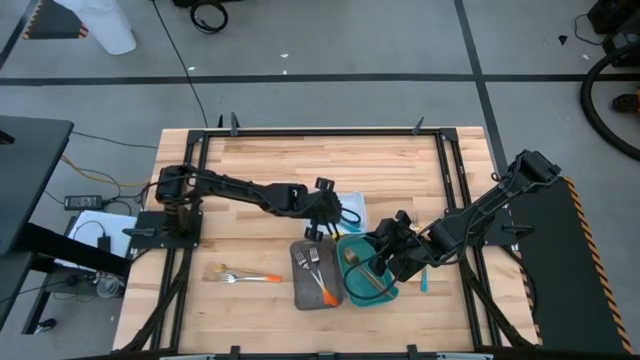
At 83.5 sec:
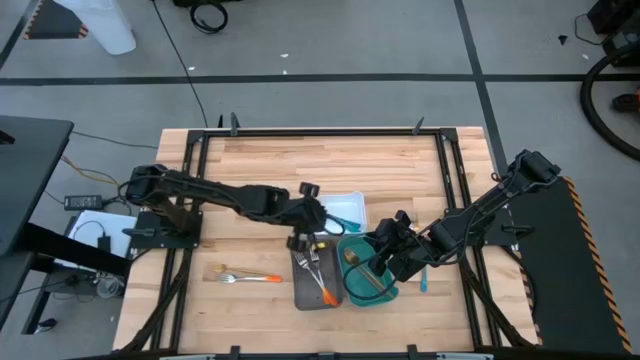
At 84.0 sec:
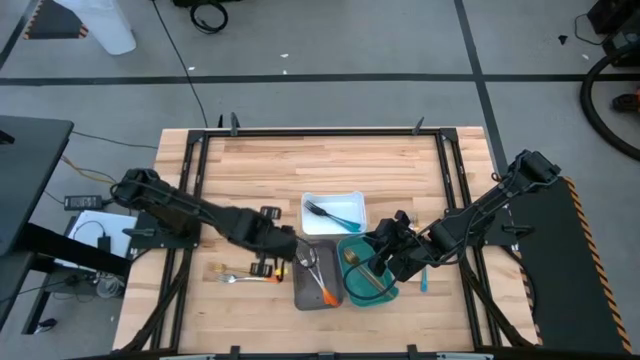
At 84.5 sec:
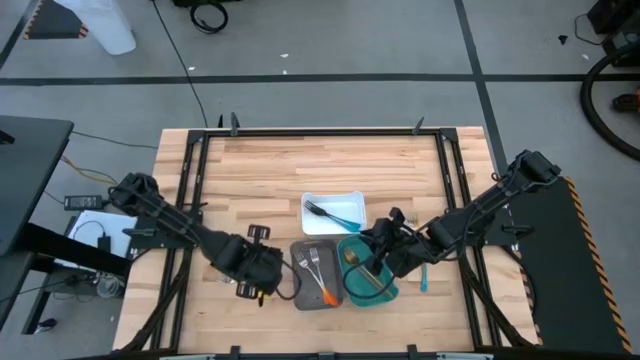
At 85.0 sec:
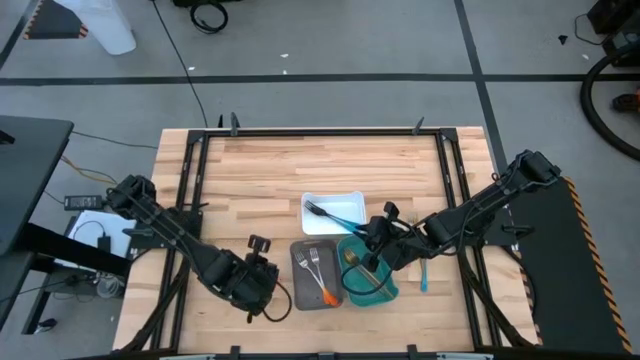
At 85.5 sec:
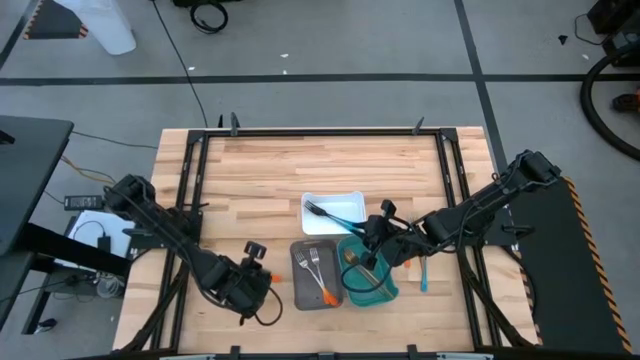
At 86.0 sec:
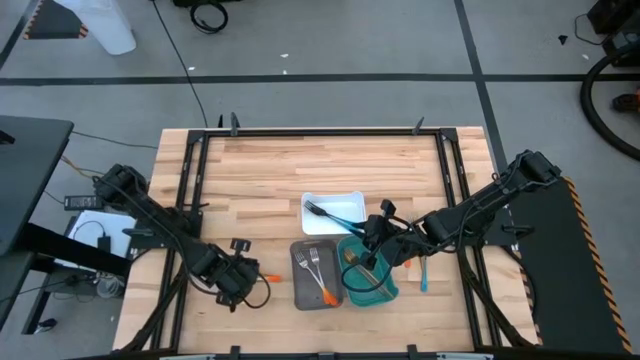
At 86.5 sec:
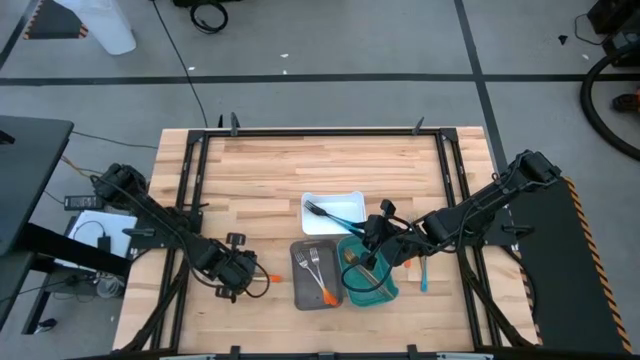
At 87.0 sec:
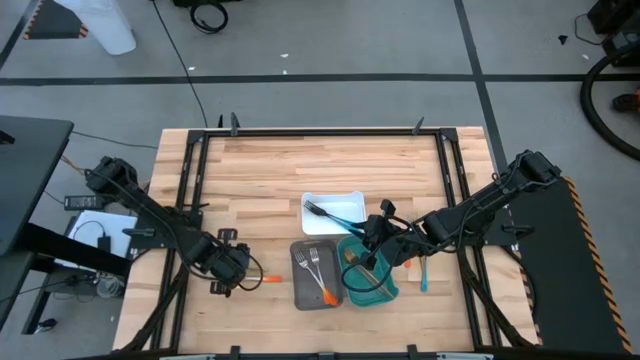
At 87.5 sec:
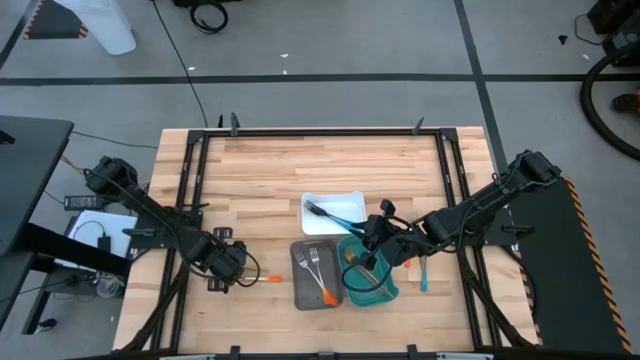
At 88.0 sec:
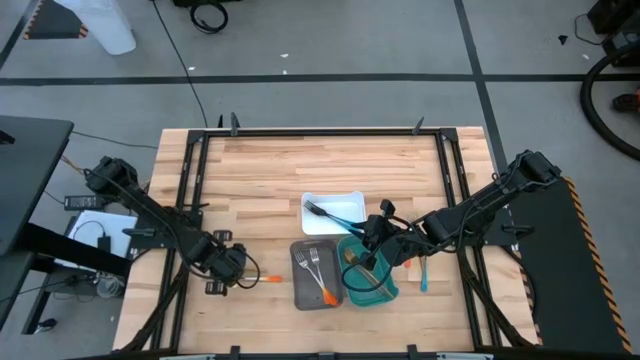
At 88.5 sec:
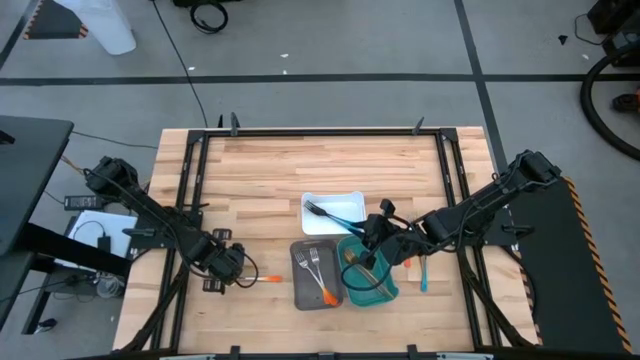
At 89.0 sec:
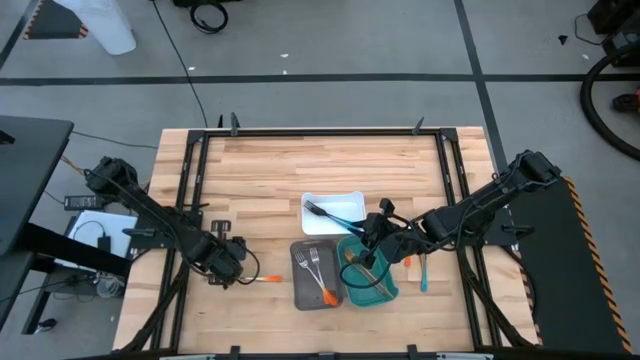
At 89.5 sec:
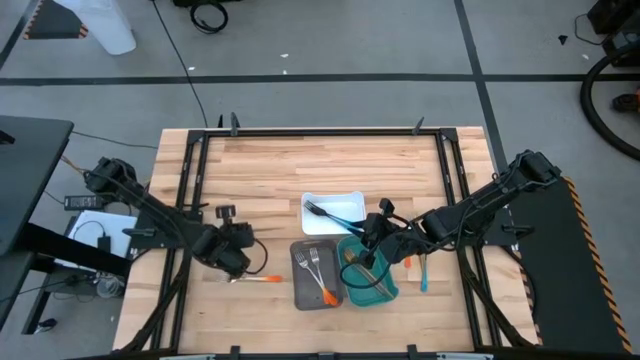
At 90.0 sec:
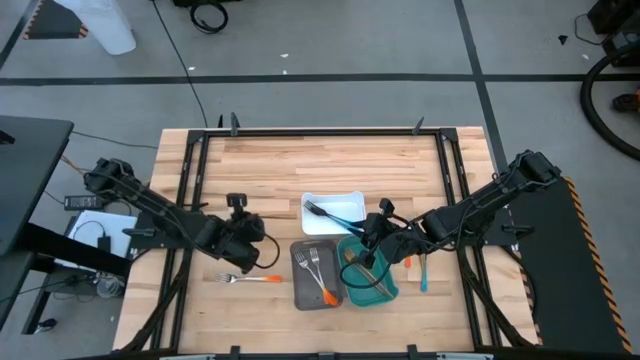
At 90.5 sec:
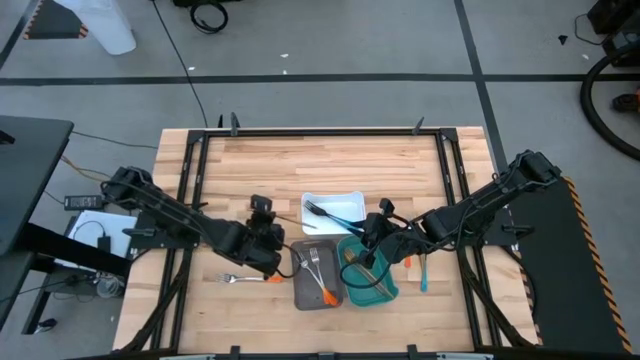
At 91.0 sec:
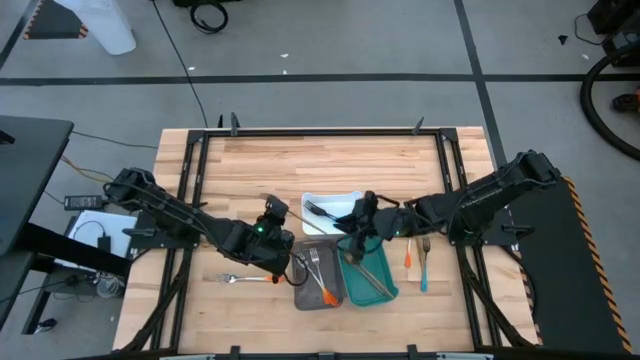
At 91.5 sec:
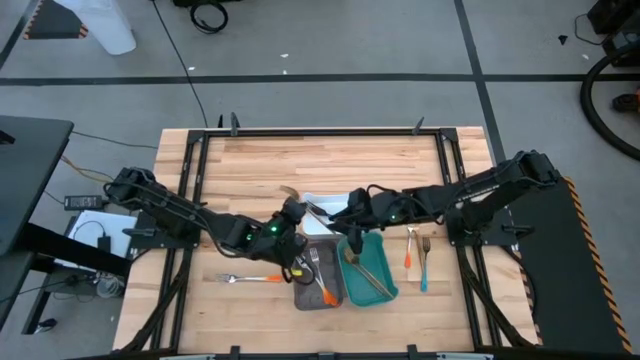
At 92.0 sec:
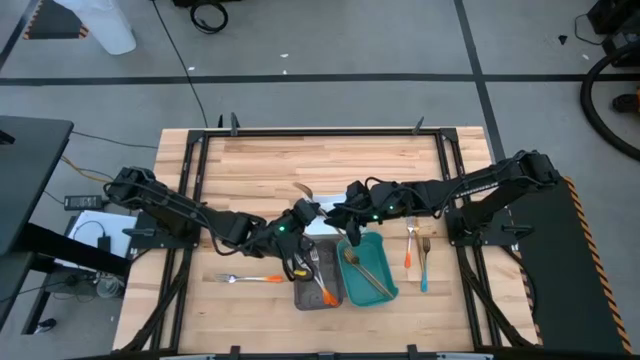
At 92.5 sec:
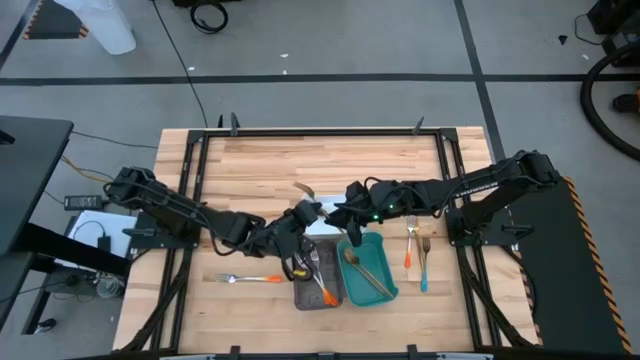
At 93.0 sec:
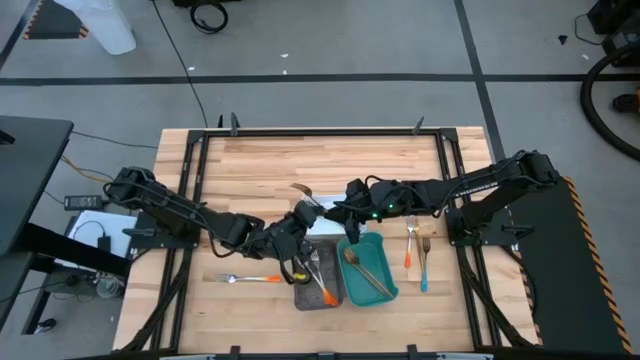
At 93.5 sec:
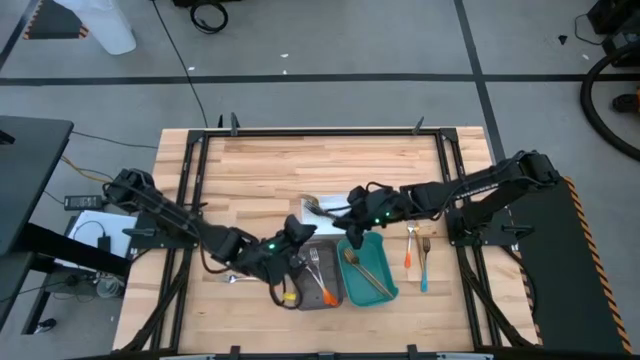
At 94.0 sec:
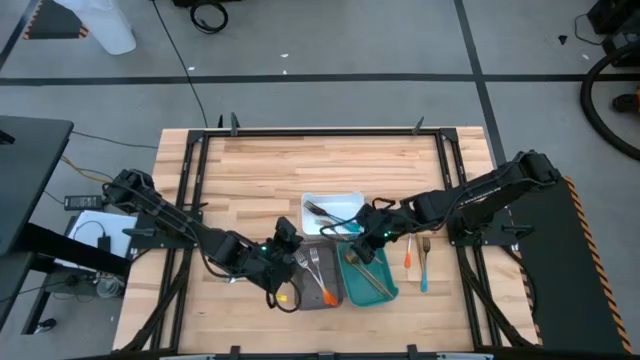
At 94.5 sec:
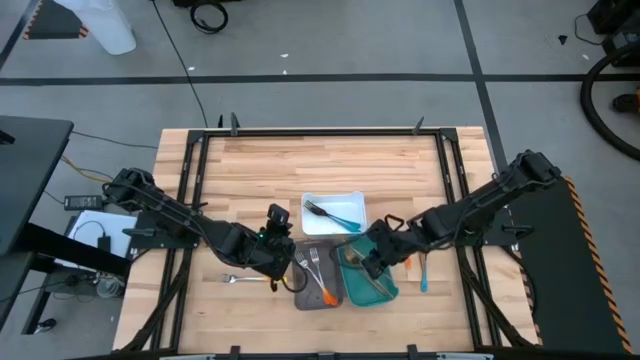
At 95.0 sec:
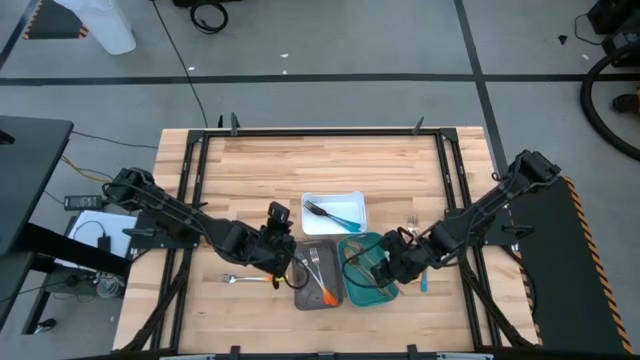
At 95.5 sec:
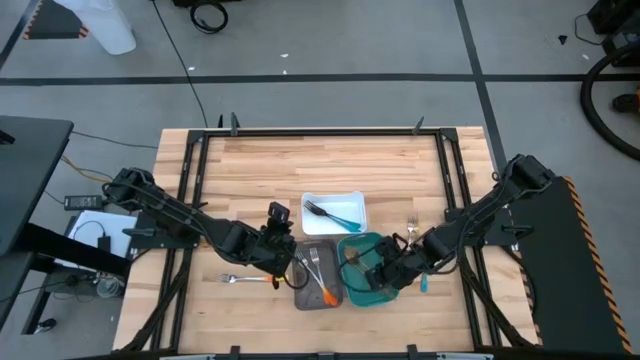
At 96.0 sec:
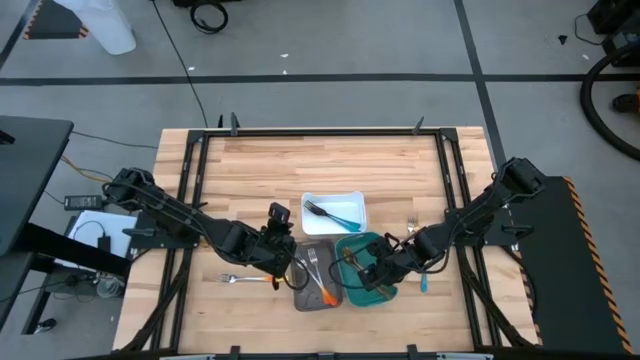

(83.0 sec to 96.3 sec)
Task: Sort silverware by color (type)
Put the gold fork into the green bin

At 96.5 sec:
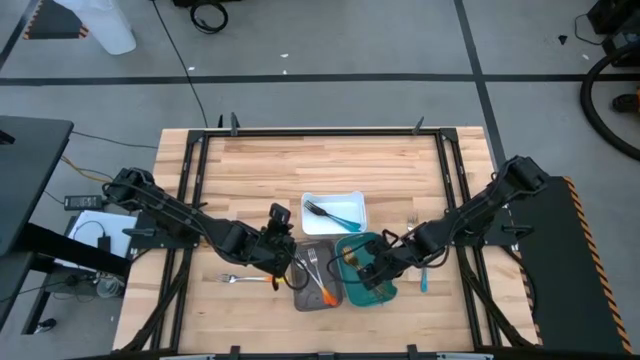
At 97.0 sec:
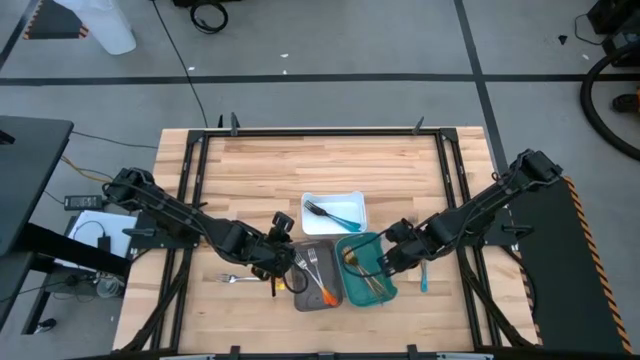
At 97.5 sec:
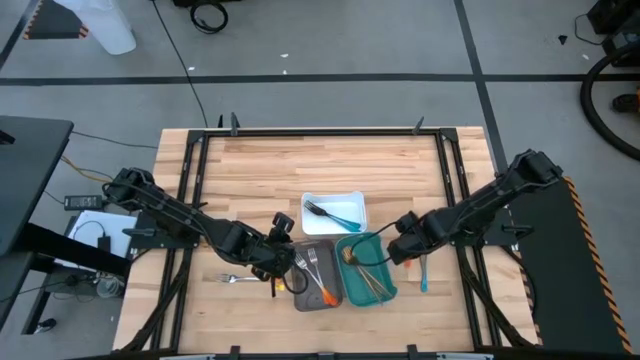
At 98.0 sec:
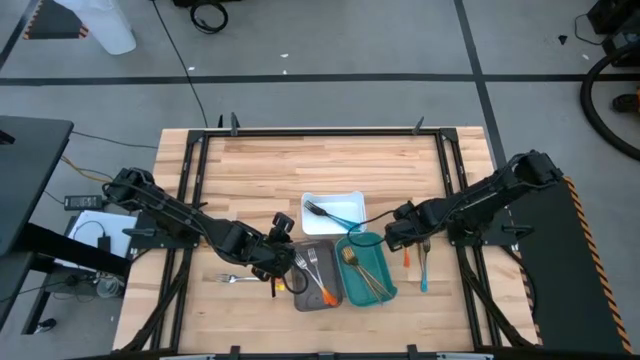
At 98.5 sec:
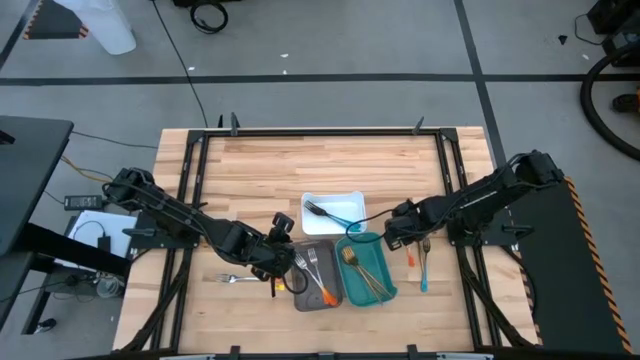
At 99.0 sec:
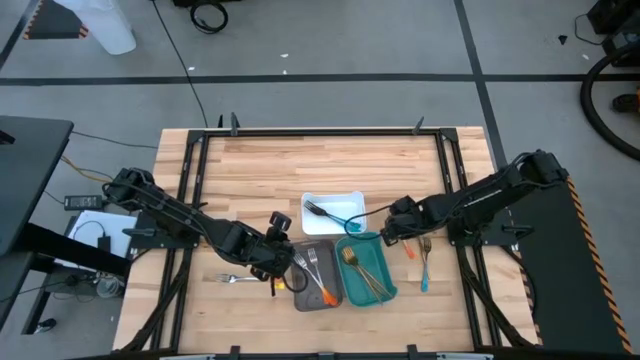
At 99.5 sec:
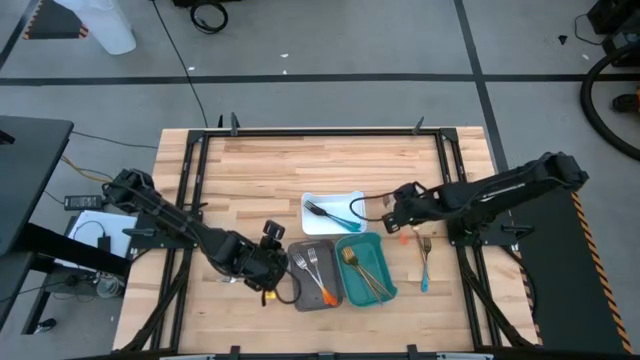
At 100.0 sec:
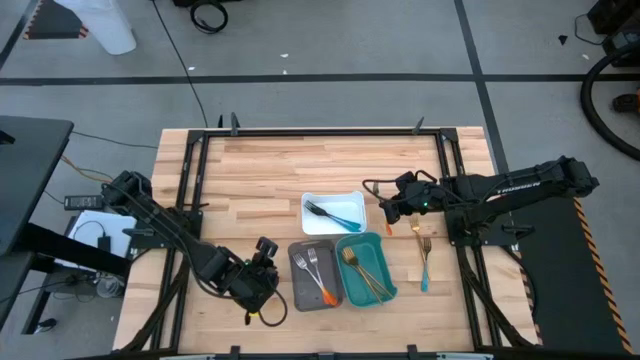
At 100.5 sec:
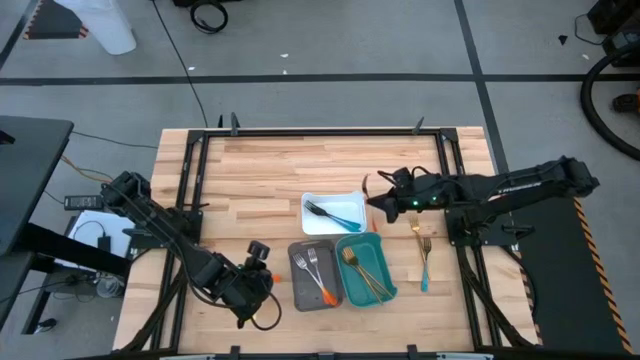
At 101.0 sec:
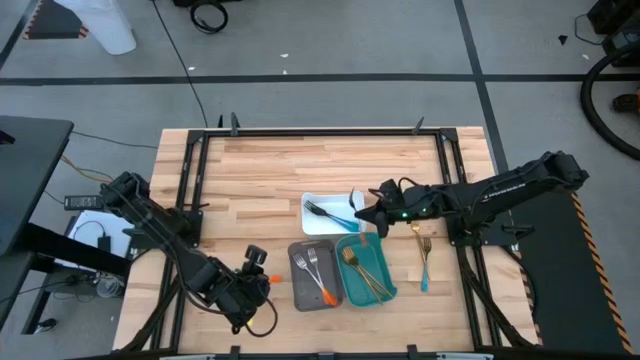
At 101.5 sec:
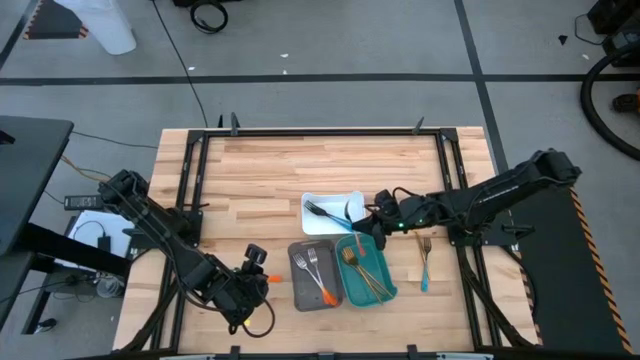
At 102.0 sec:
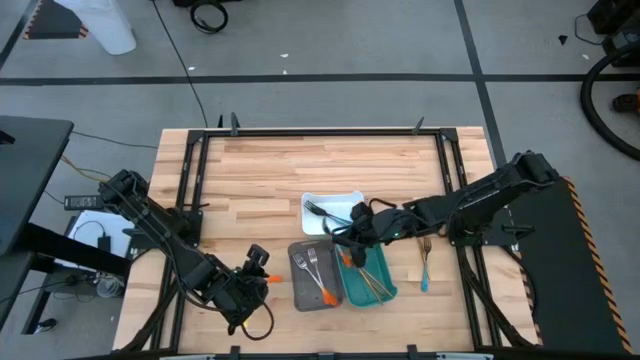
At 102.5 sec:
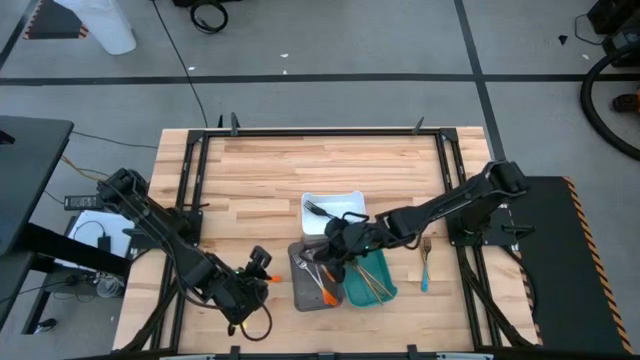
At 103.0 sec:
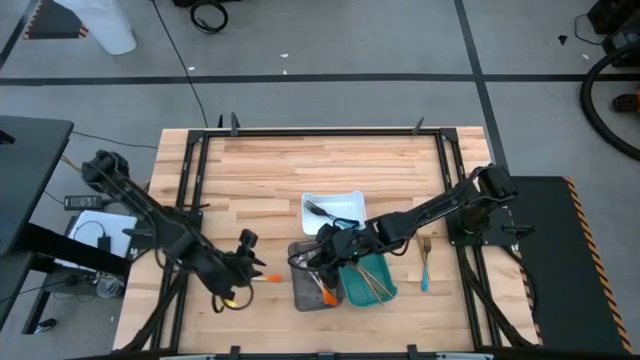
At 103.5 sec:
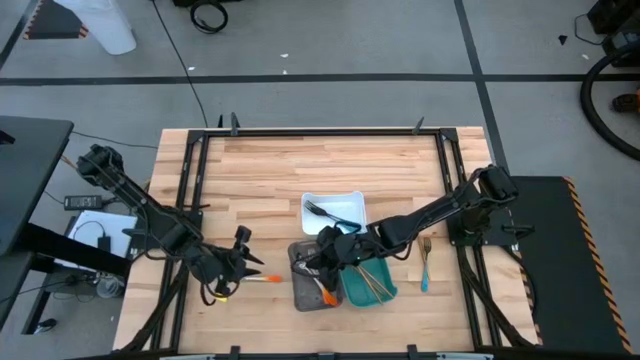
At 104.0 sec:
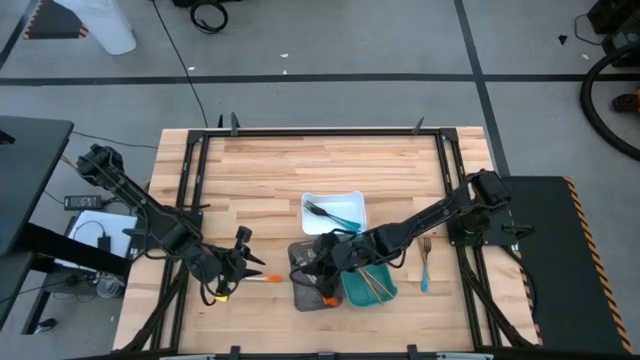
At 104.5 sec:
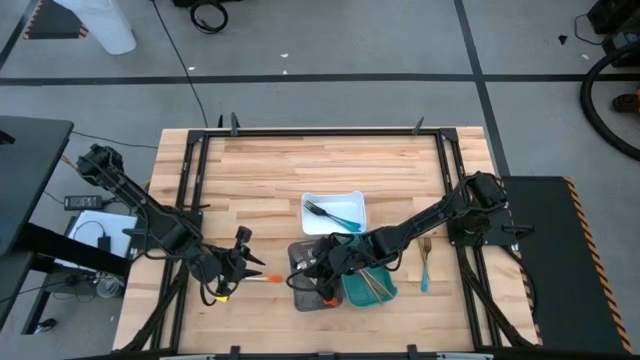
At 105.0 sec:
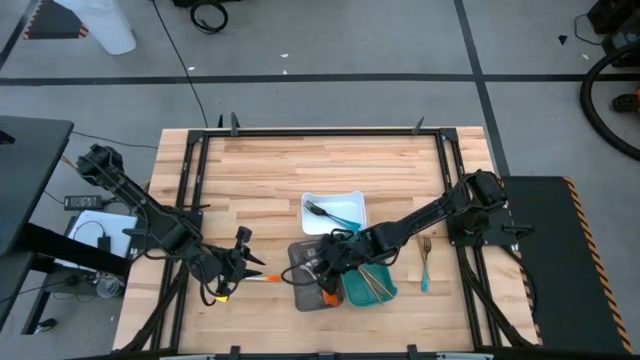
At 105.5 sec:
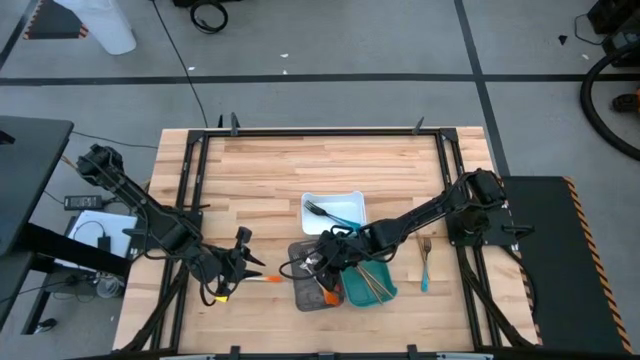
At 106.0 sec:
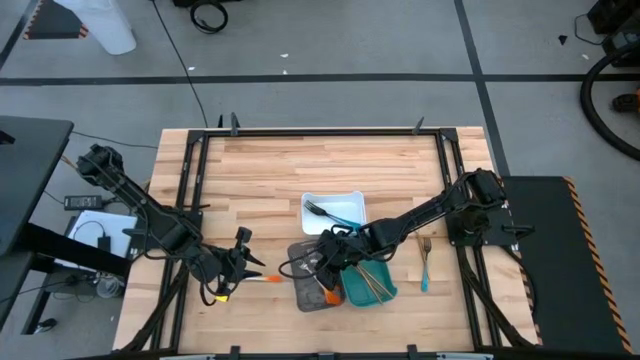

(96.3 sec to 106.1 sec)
Put the orange fork into the black bin
